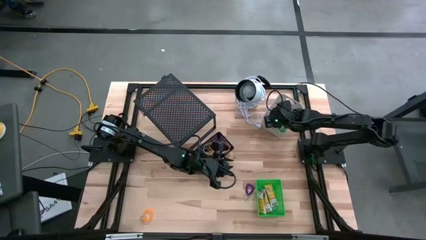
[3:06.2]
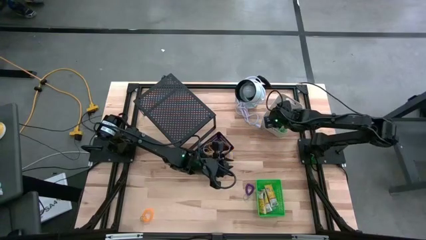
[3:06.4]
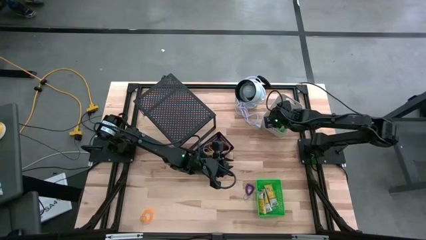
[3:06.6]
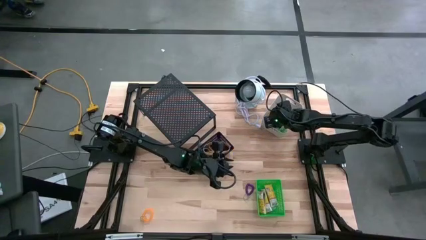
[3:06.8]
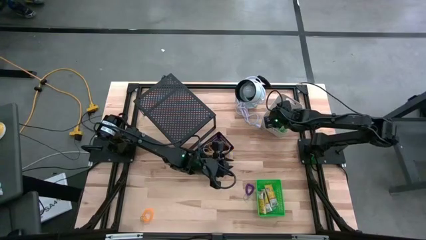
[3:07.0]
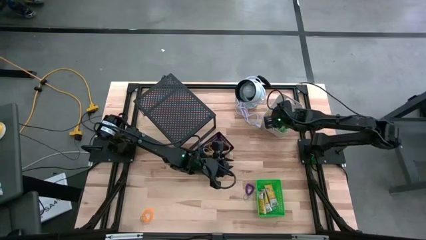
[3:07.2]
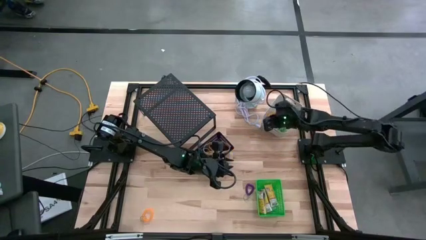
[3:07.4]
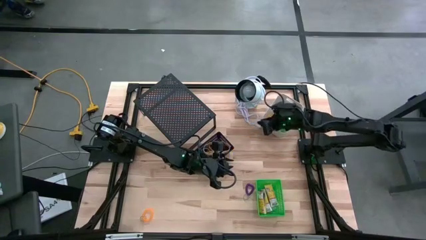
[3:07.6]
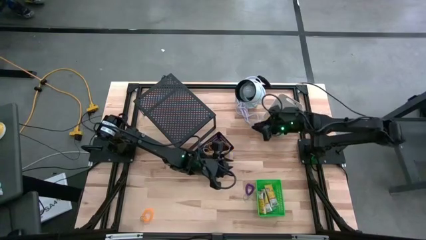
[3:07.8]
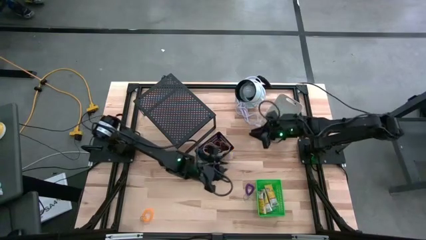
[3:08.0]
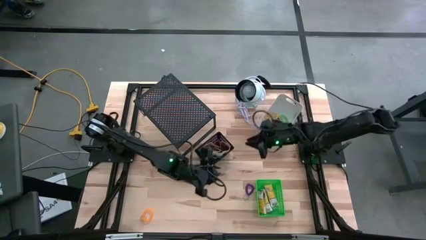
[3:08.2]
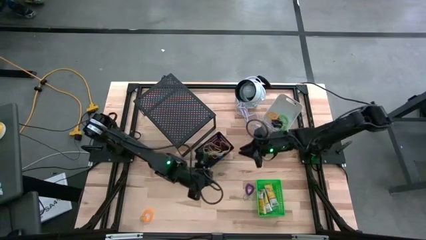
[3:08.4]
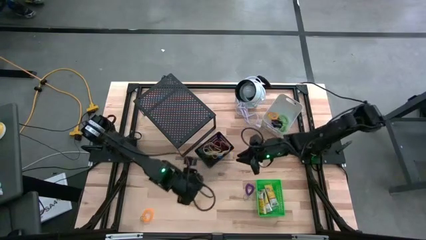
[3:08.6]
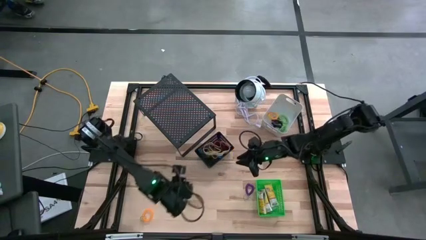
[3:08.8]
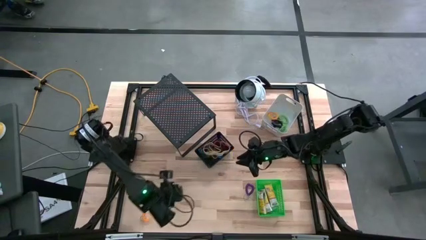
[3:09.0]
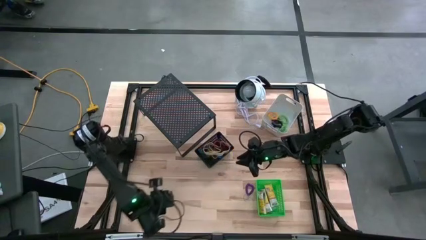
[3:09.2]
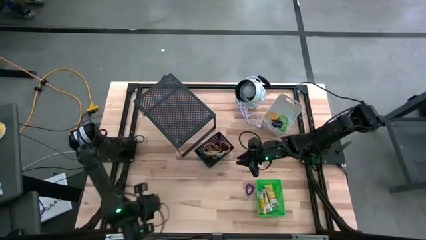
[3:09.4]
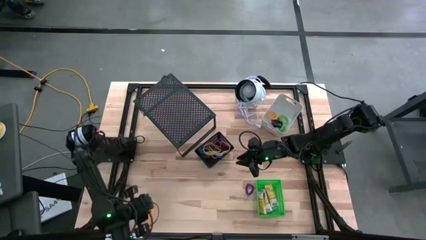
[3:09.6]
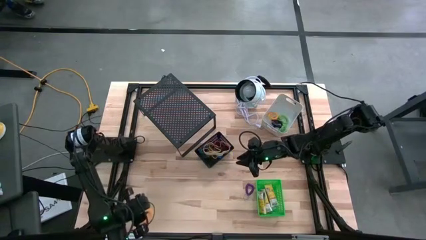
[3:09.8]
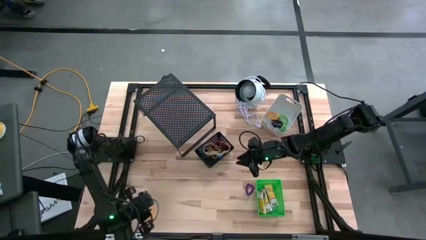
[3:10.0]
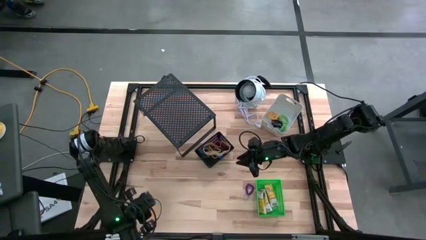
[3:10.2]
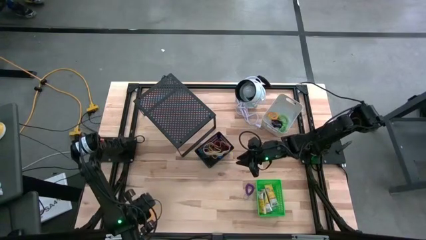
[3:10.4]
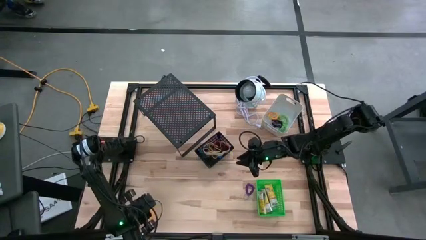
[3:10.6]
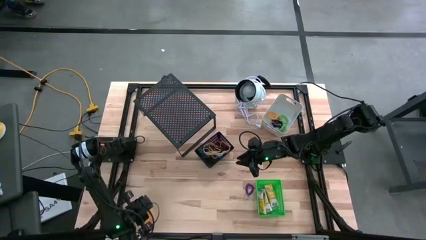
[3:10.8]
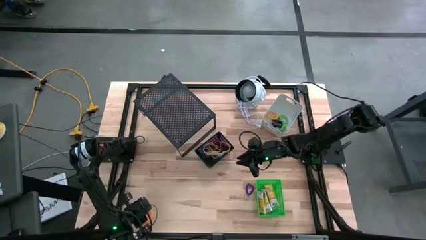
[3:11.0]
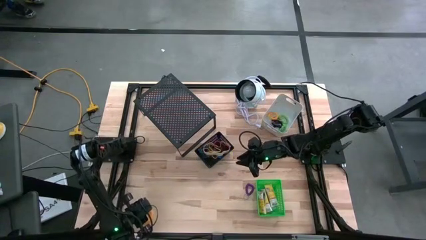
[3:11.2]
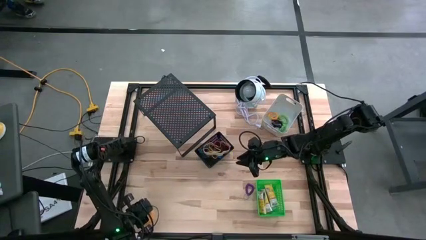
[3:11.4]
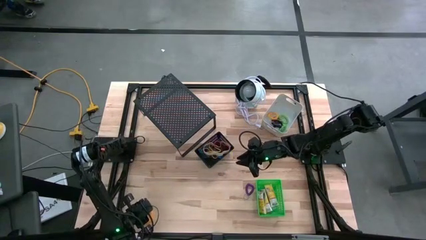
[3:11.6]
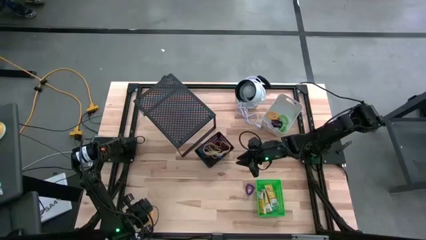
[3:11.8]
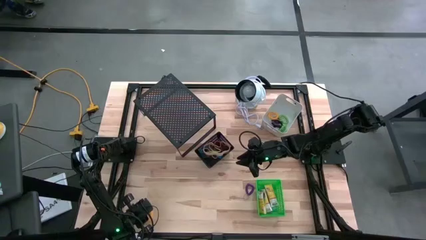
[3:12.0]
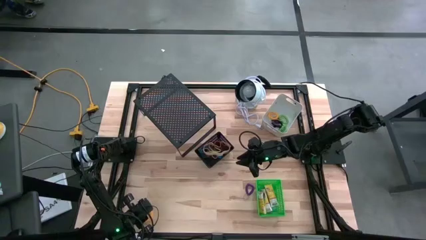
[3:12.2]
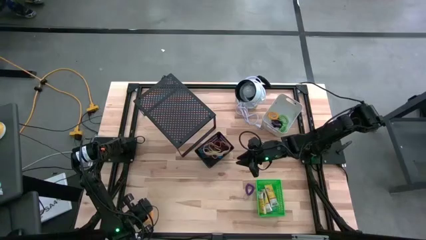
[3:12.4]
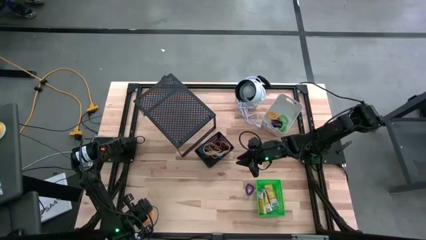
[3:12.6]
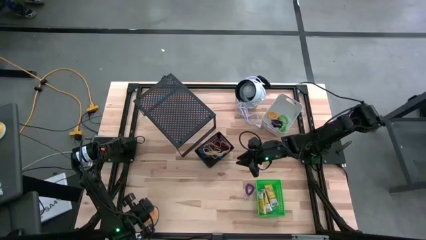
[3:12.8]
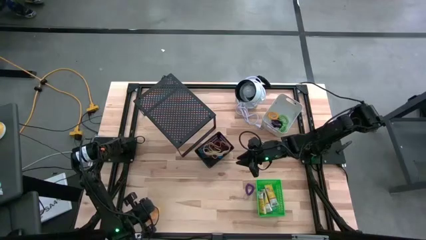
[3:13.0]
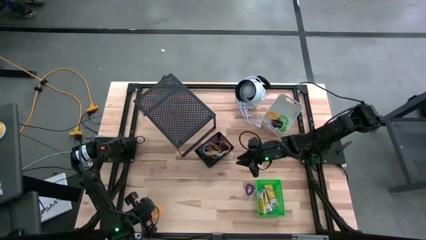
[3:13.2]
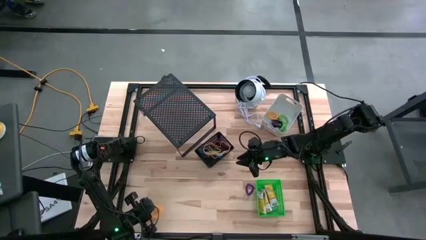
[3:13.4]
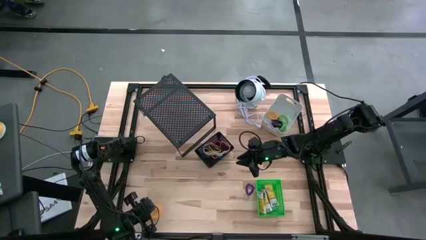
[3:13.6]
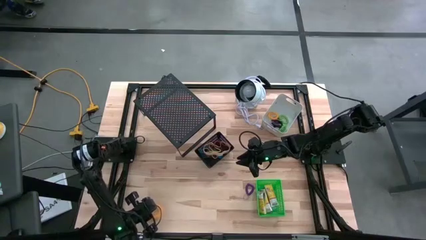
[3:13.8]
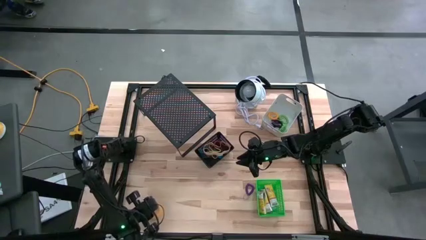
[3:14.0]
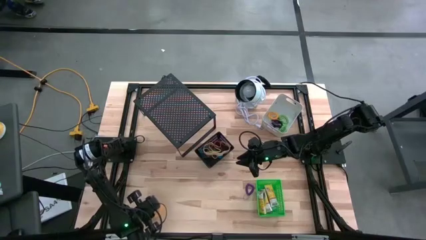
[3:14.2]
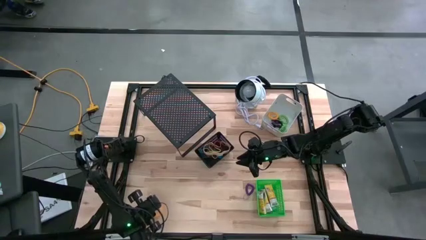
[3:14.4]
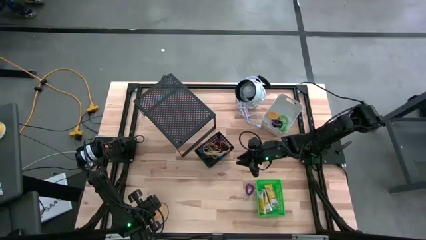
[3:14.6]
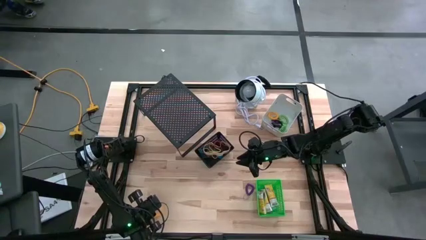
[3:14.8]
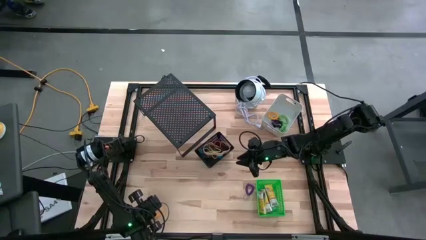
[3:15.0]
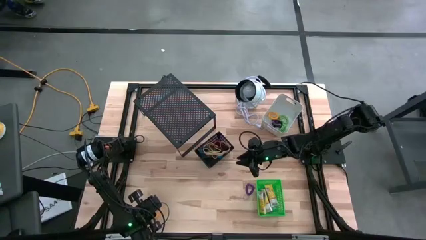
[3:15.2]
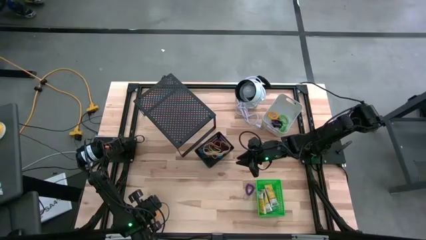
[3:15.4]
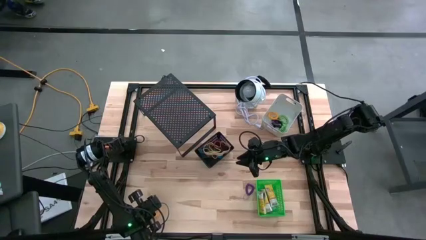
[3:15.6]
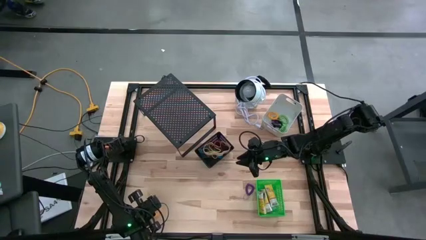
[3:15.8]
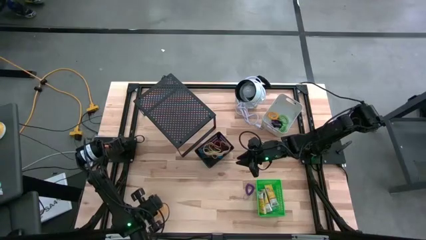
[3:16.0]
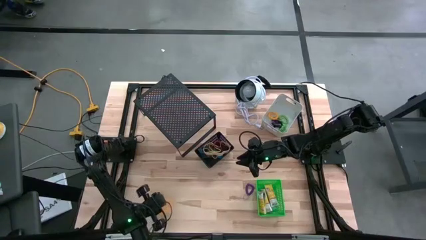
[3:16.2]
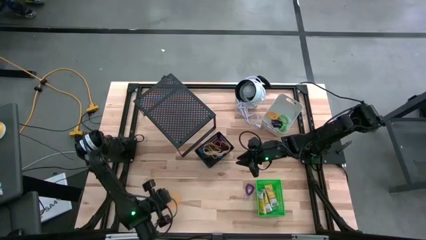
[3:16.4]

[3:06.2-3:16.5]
Task: Pick & Place Office Desk Supplies
Put the orange spring keychain into the white bin

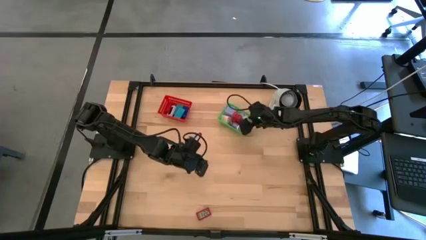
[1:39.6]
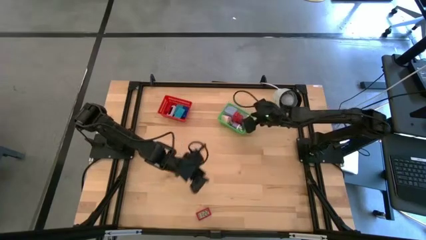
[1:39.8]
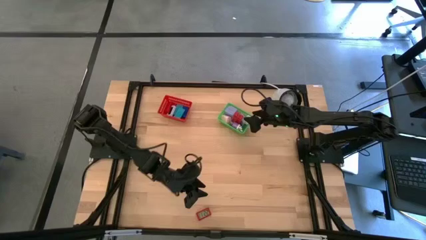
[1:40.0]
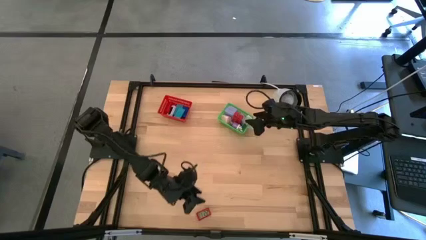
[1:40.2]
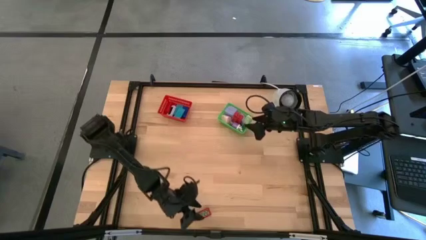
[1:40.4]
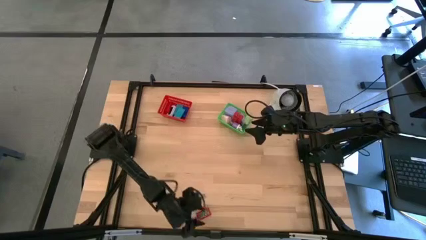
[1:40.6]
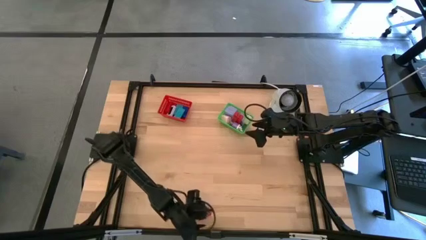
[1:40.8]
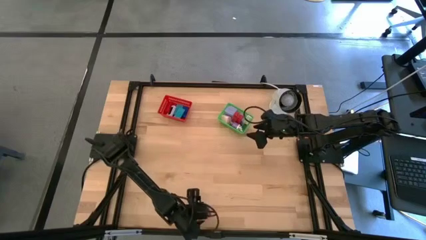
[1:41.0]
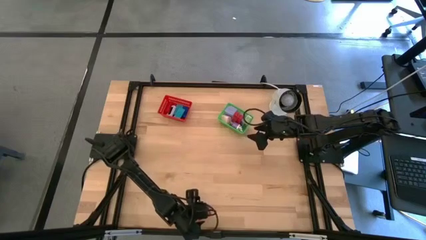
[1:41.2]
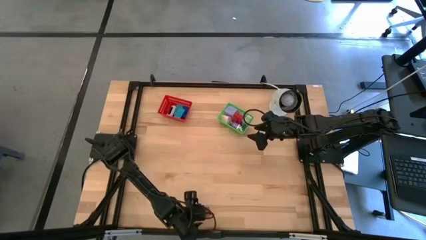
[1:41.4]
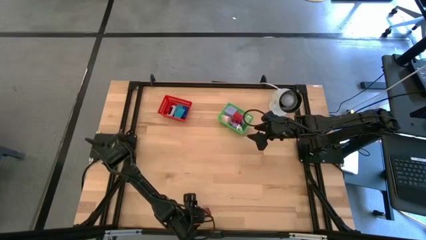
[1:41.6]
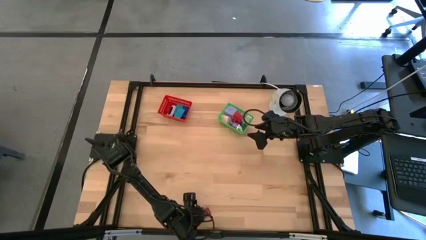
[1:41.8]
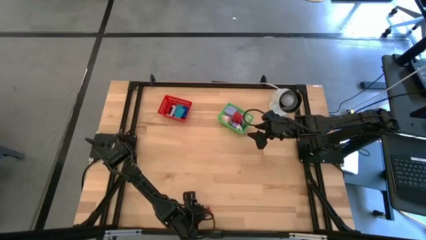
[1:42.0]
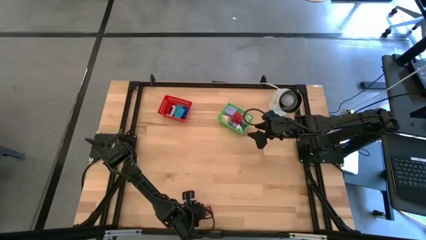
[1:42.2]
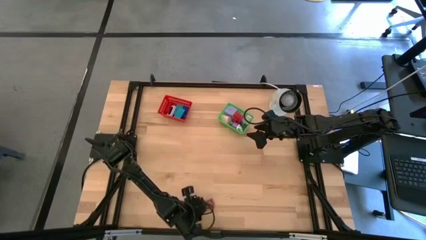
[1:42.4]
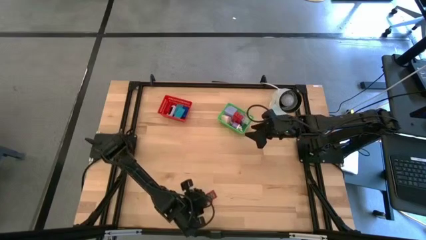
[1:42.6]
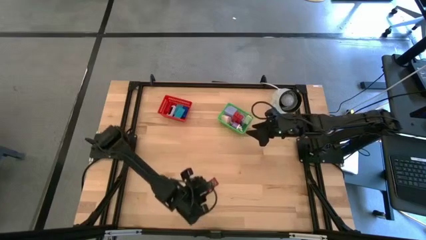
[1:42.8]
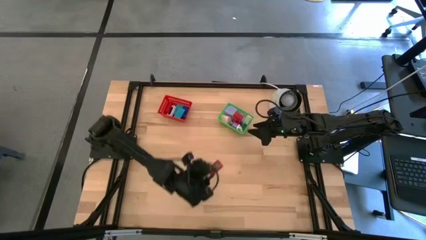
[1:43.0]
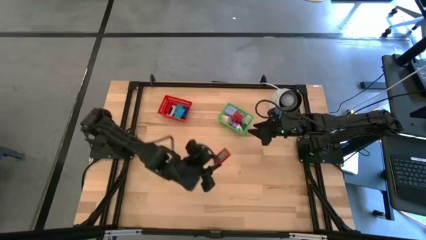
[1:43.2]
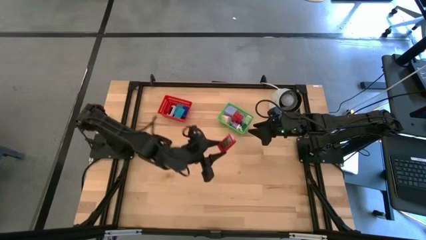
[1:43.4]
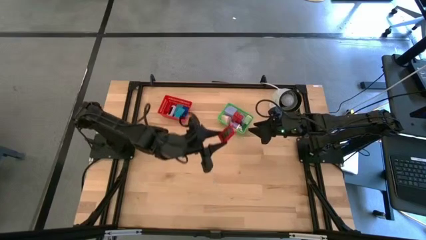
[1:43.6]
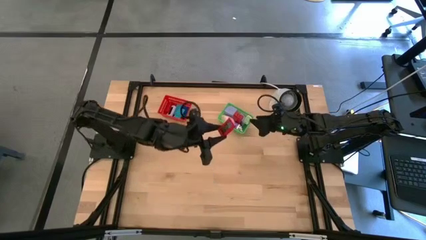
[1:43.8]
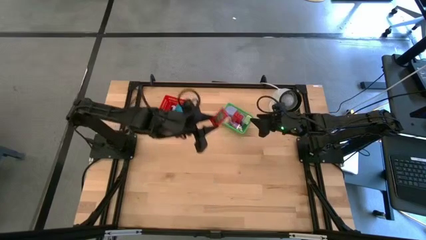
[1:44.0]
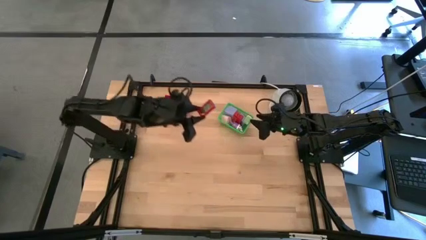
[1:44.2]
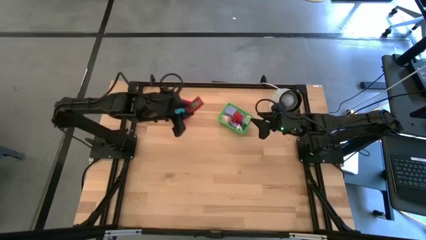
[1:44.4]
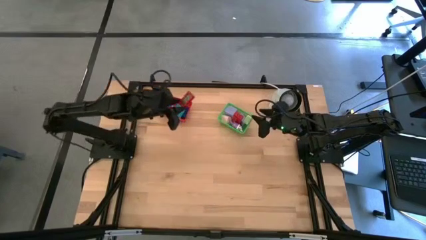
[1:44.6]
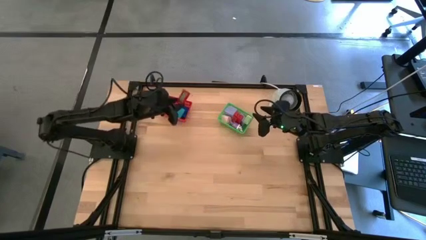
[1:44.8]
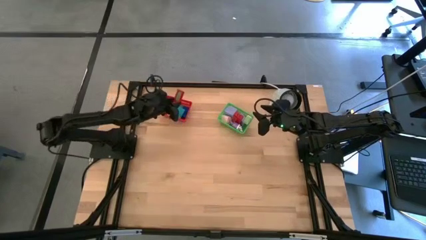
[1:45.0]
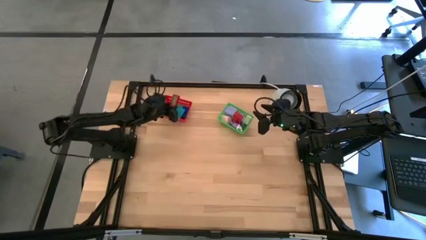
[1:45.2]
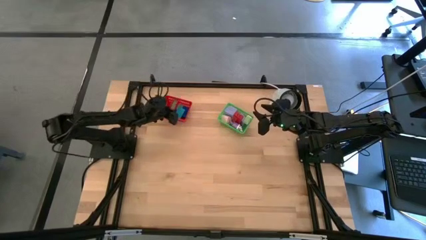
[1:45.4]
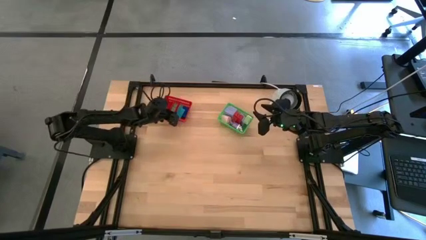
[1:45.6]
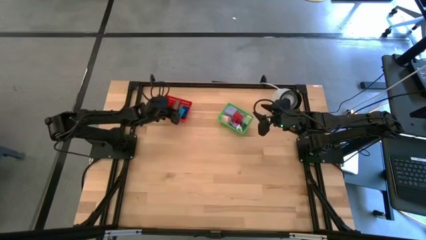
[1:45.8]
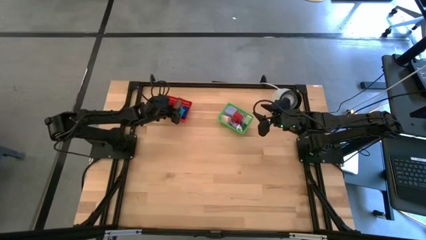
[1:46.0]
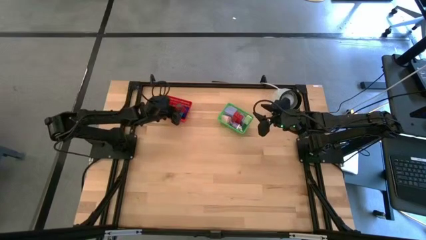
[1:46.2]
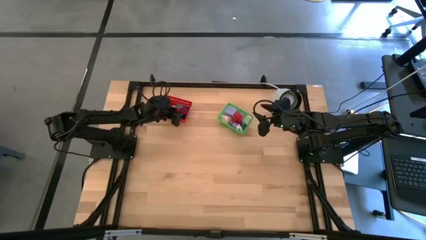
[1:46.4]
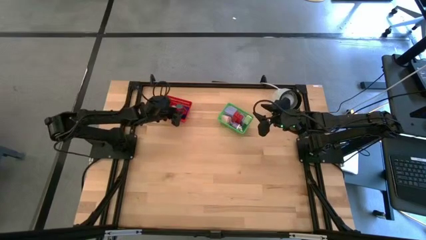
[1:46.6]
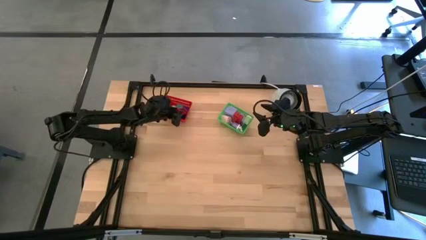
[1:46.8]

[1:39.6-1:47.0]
Task: Pick & Place Office items
Put the red digital clock into the red bin
